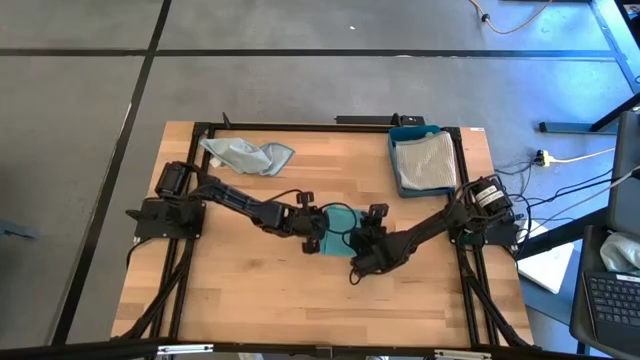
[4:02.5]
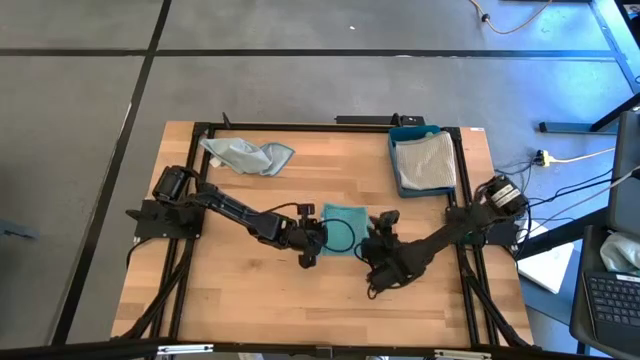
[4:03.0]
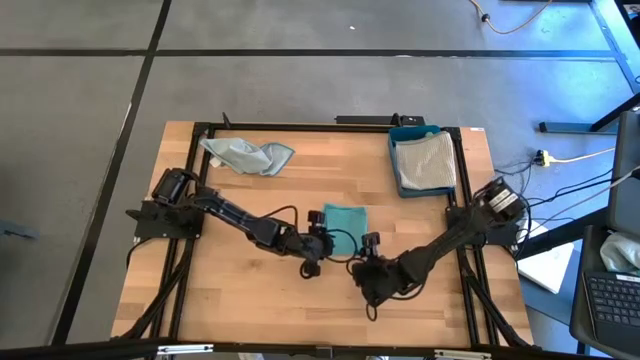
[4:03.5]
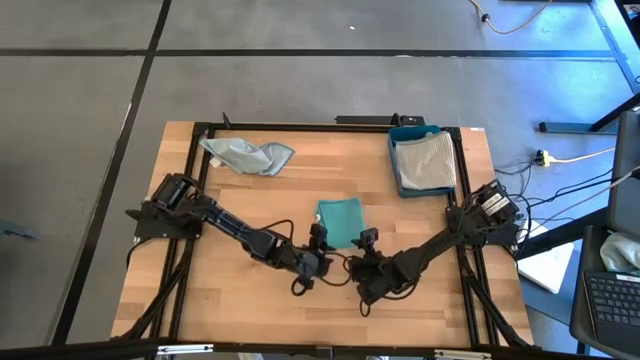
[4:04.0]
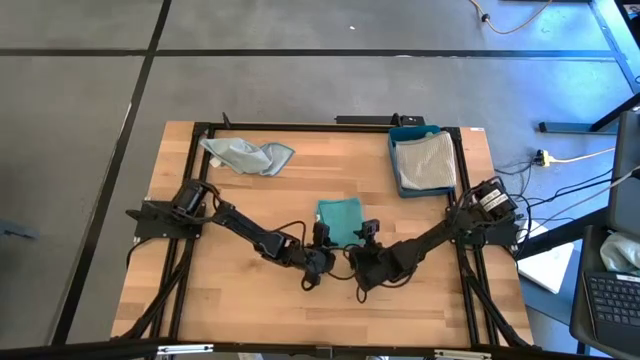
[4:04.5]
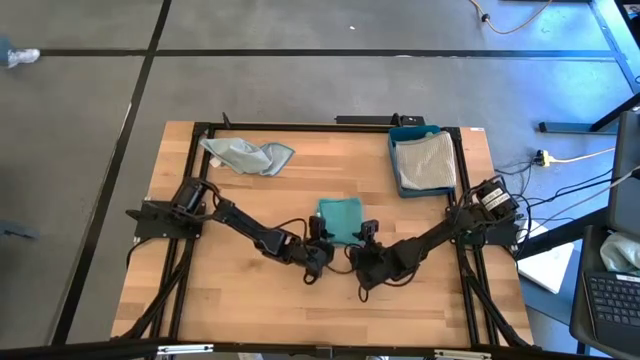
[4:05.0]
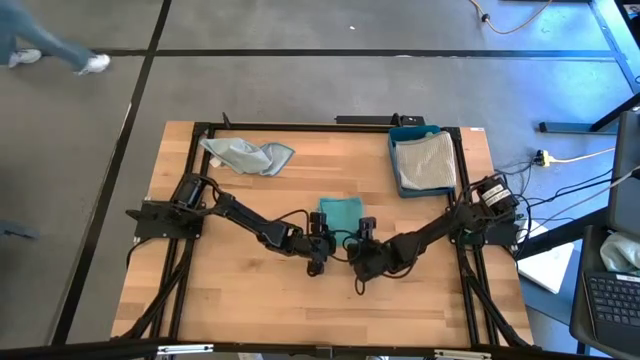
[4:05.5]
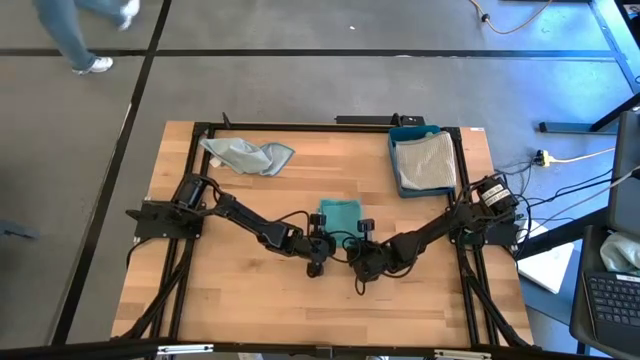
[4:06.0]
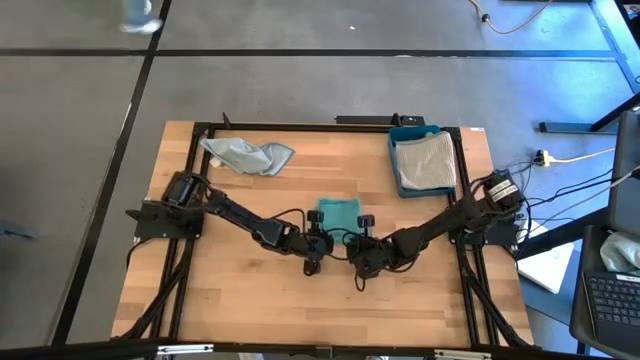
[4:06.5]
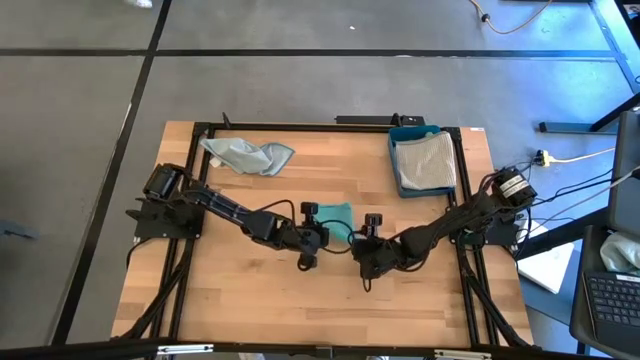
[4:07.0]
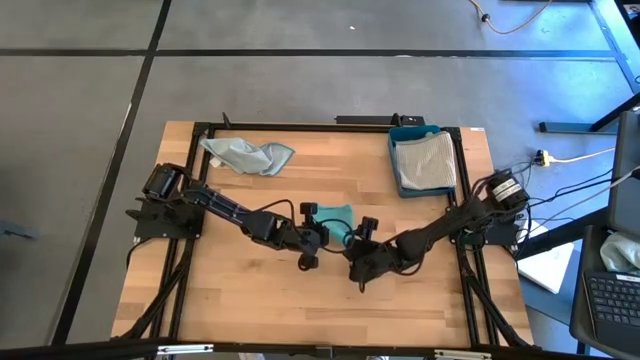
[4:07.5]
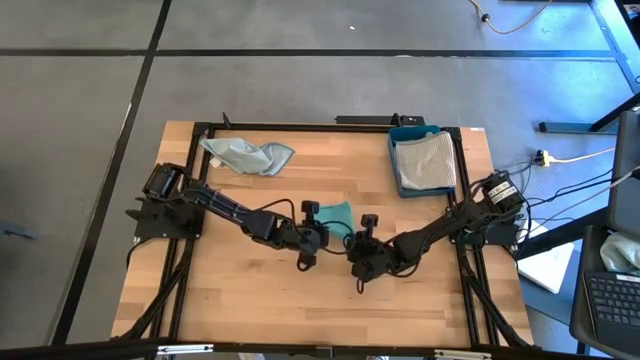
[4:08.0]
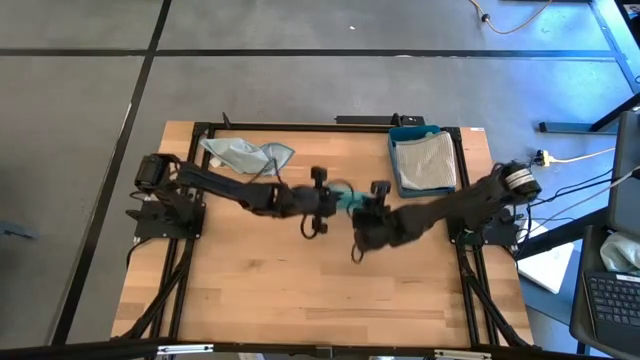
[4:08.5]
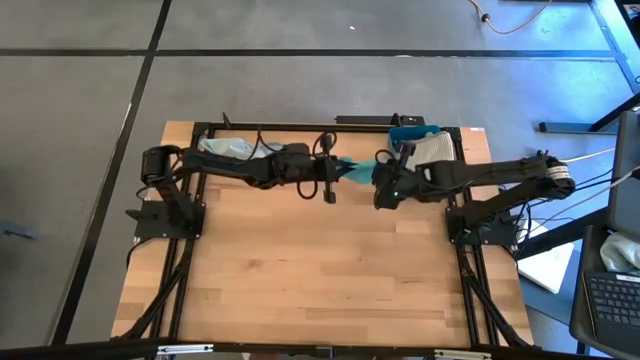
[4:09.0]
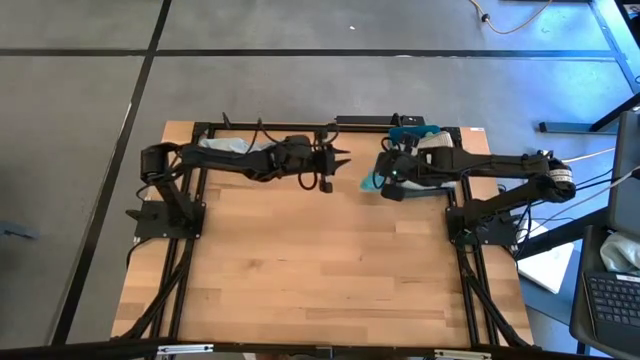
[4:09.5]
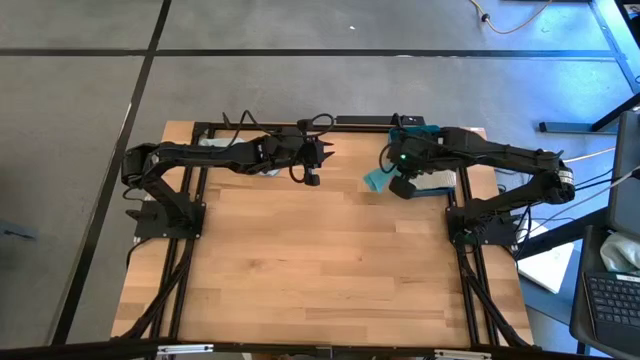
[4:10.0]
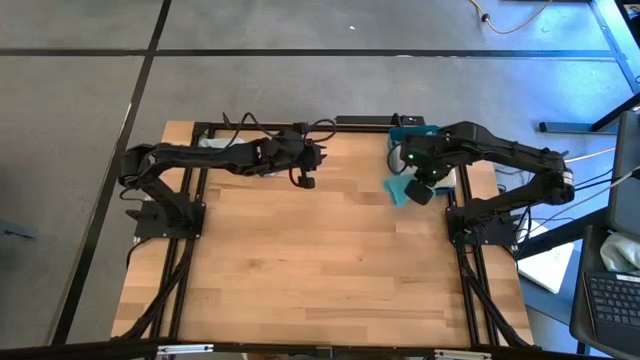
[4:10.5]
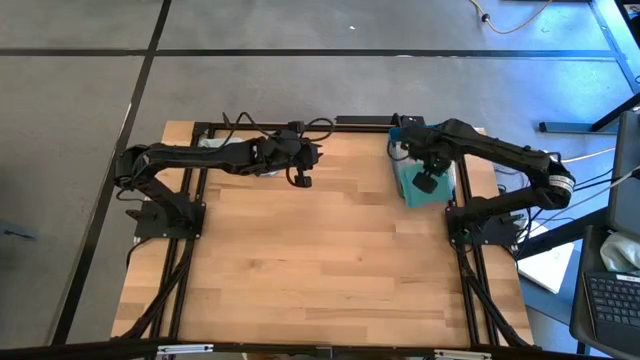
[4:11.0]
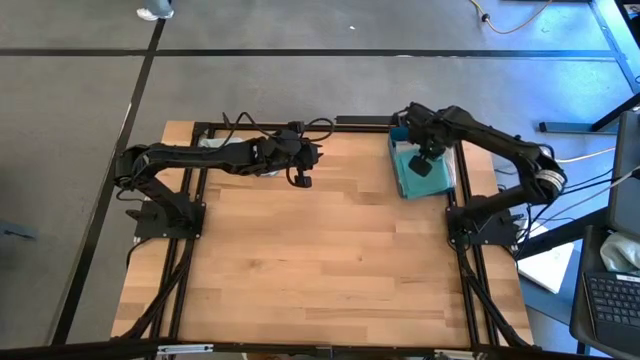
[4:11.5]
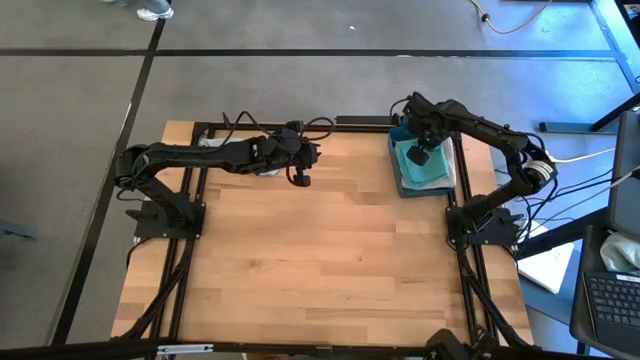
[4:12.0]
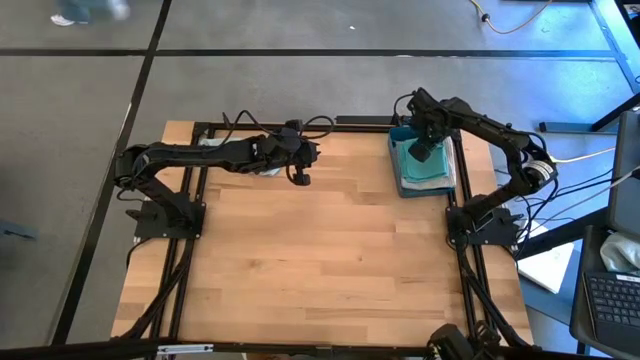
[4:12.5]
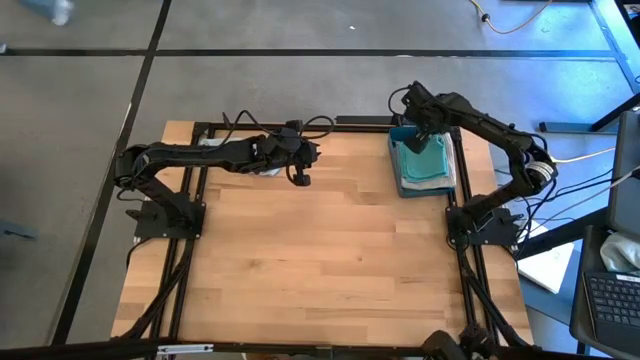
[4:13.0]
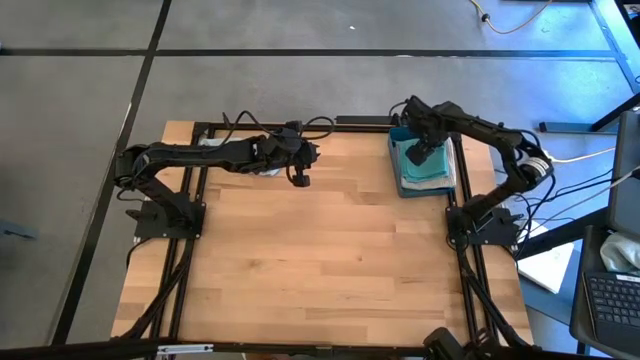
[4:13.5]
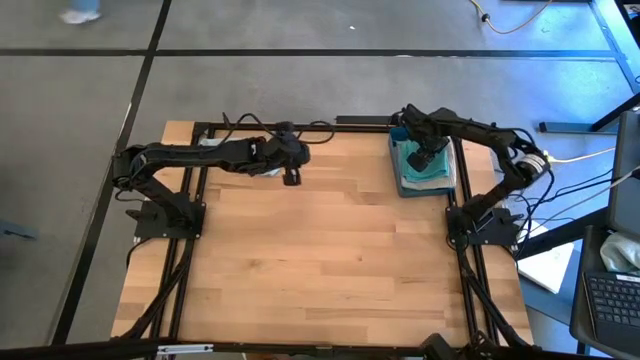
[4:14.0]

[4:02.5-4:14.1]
Task: Fold microfiber towels
Put the blue microfiber cloth into the blue bin

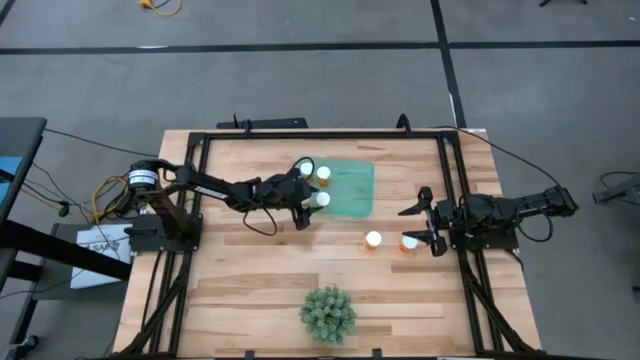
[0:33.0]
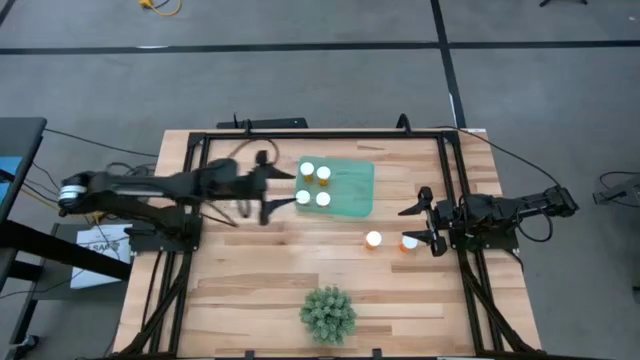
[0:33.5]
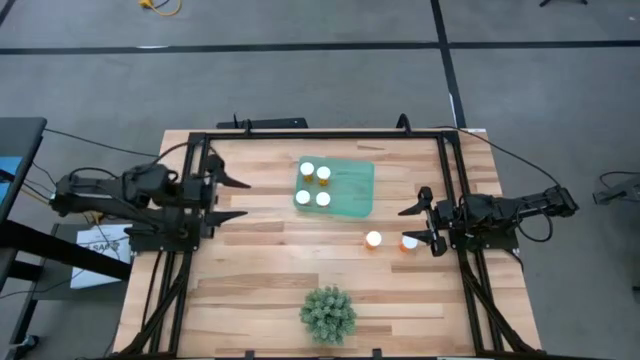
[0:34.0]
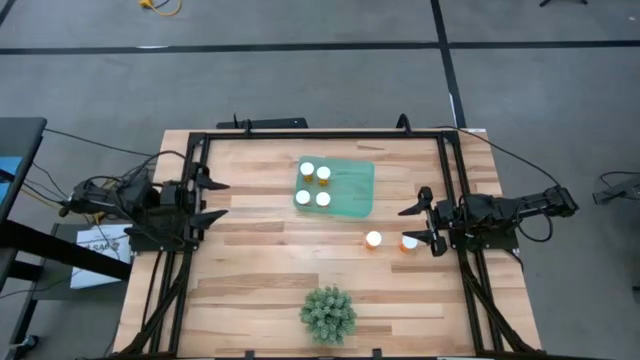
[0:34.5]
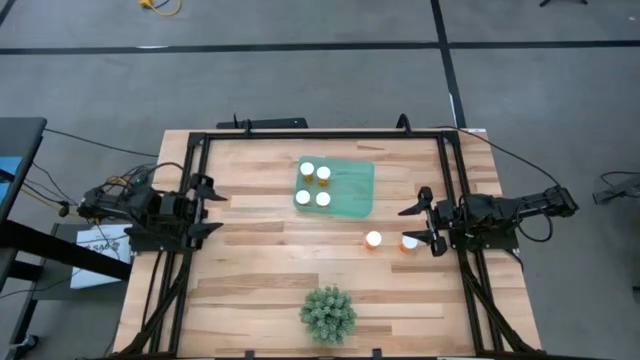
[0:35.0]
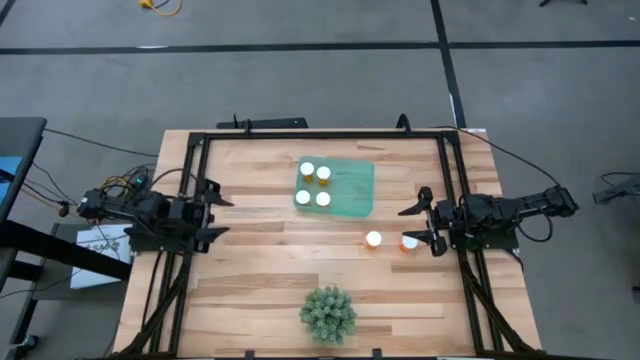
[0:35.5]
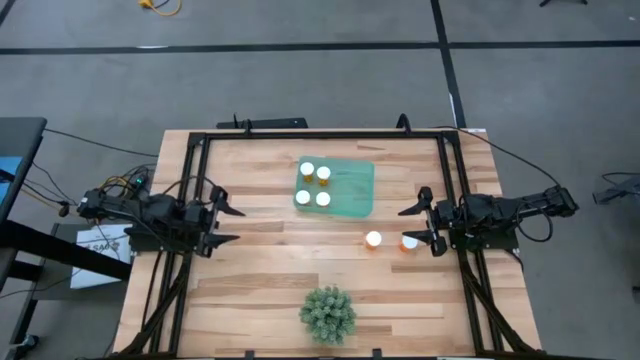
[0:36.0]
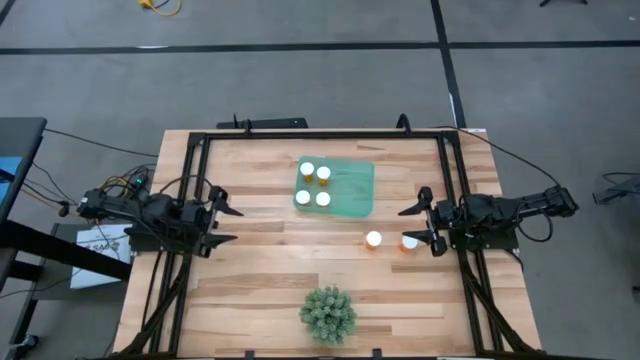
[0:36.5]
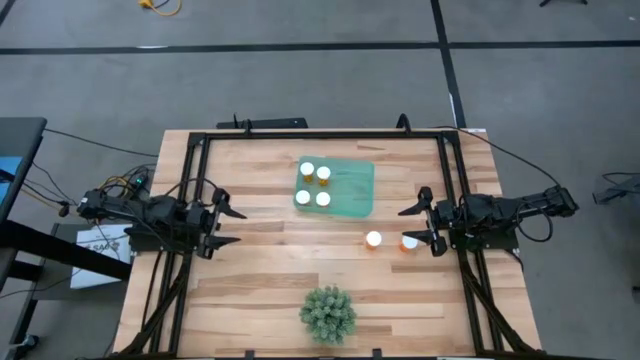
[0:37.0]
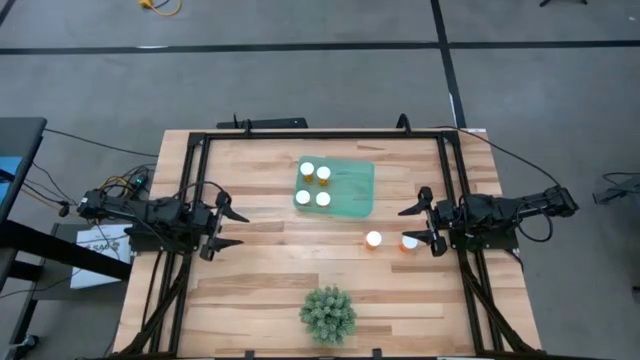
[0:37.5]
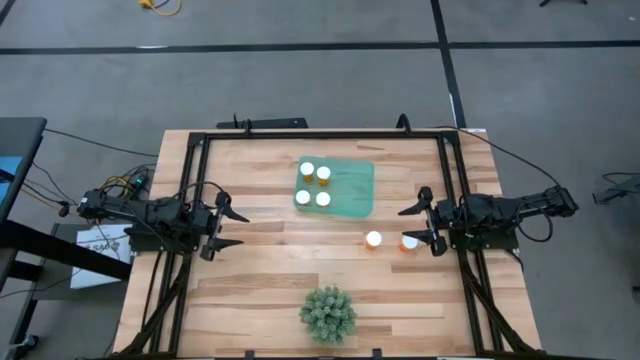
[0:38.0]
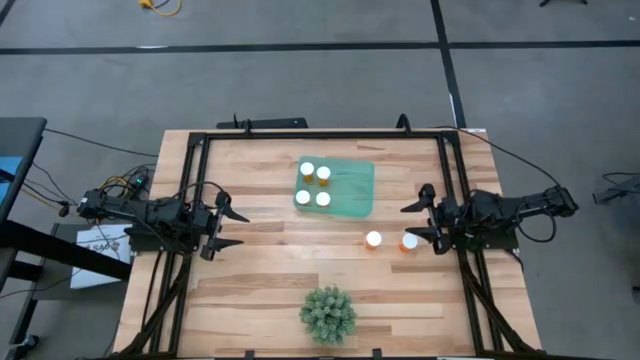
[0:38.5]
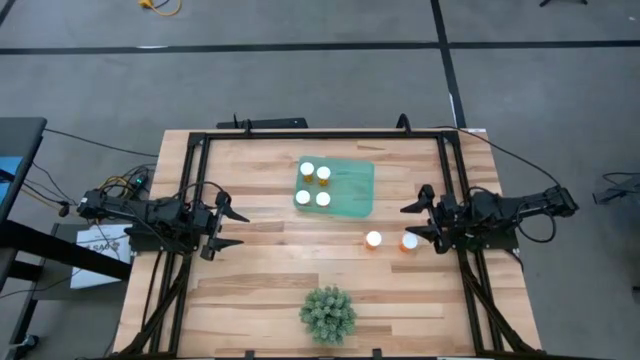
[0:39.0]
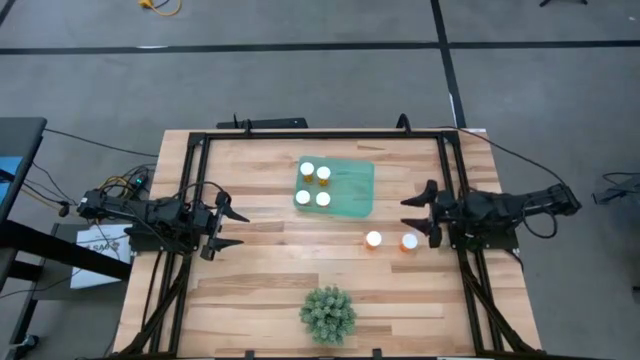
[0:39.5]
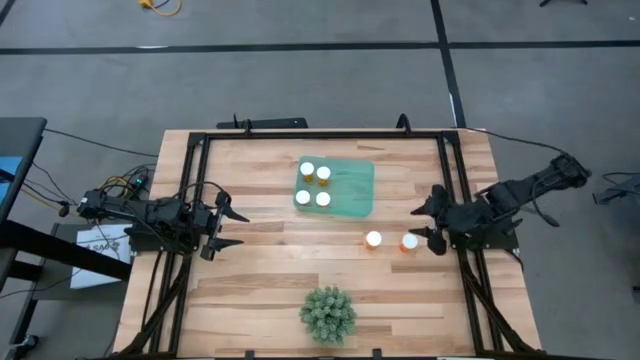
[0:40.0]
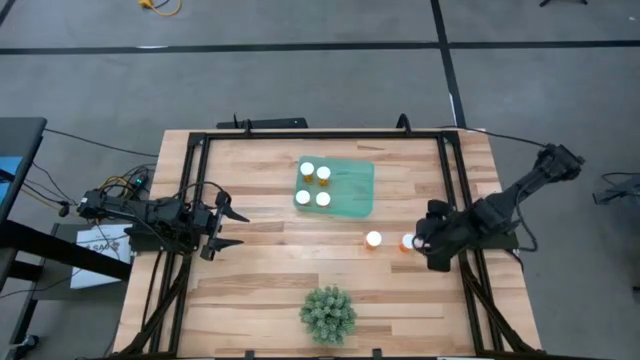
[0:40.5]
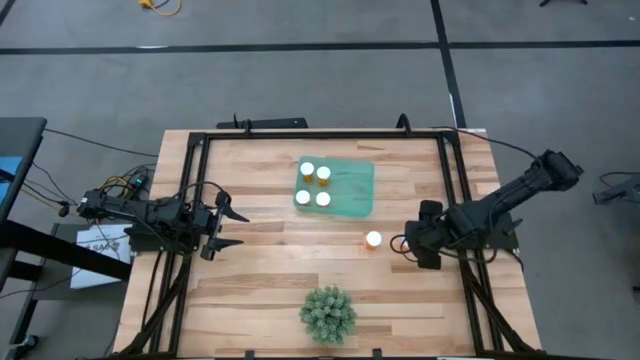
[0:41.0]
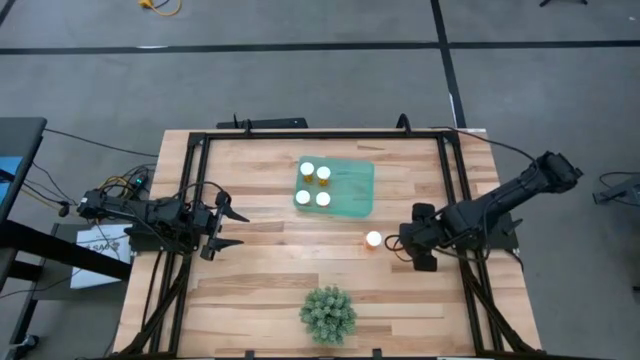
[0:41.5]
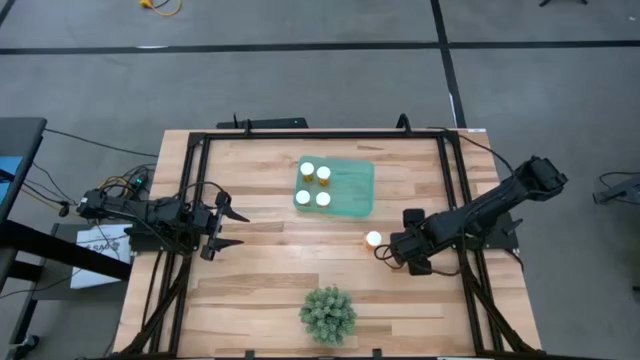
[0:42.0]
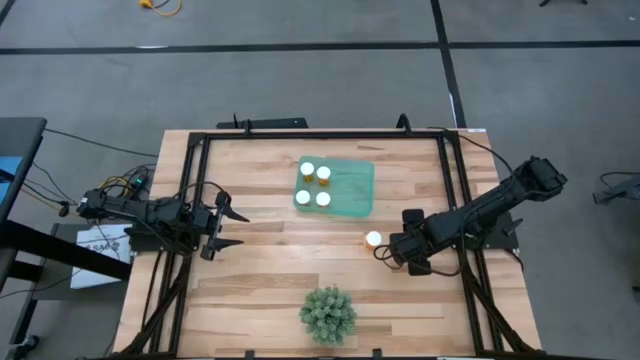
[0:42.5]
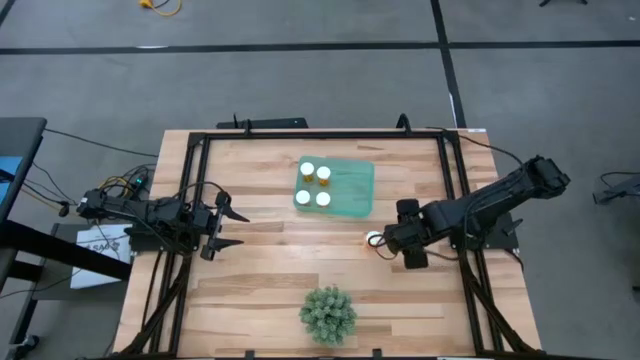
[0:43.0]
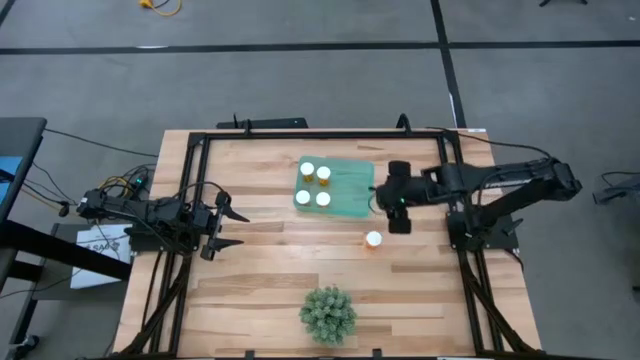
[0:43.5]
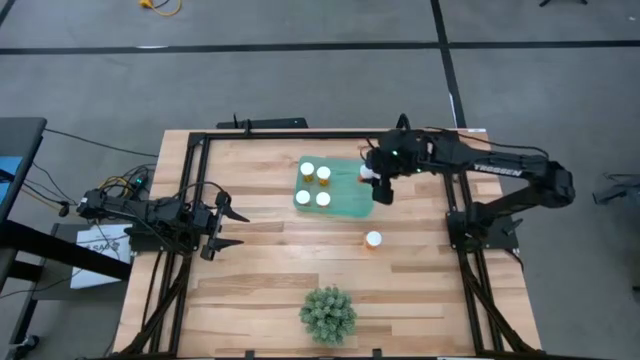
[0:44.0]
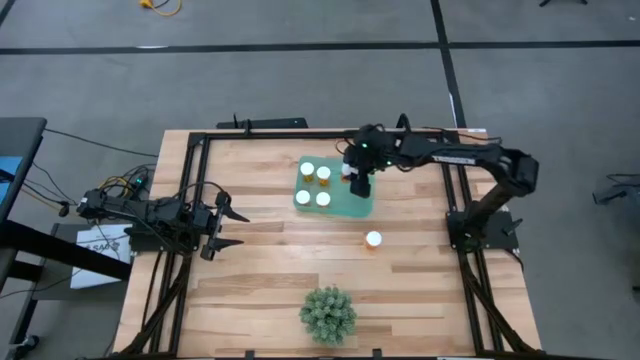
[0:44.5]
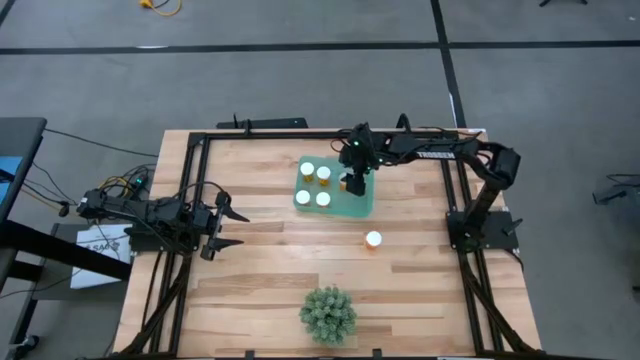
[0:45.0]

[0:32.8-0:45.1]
Task: Pick and place pill bottles into a basket
Put the orange pill bottle into the green bin
